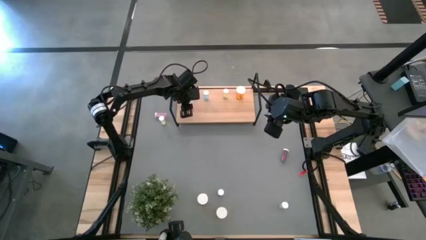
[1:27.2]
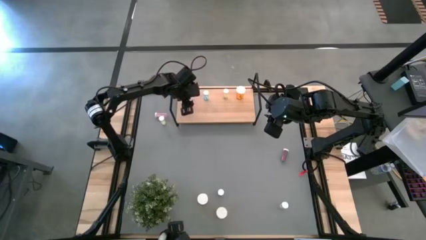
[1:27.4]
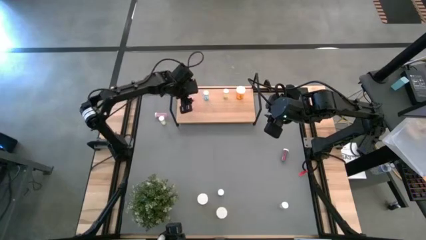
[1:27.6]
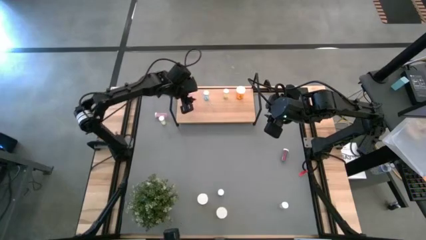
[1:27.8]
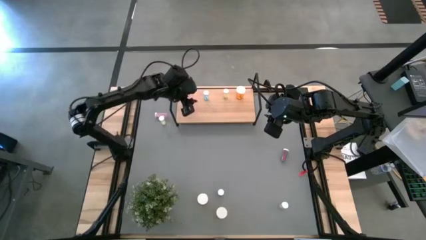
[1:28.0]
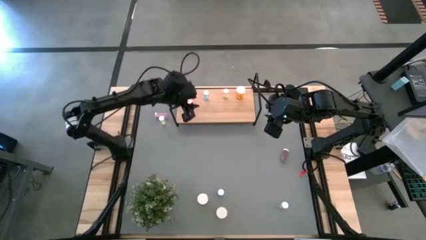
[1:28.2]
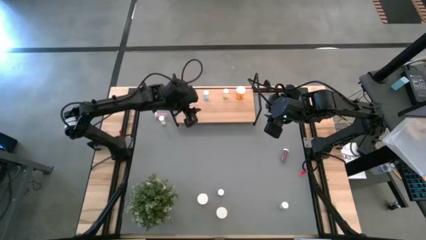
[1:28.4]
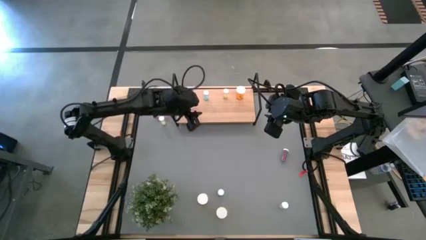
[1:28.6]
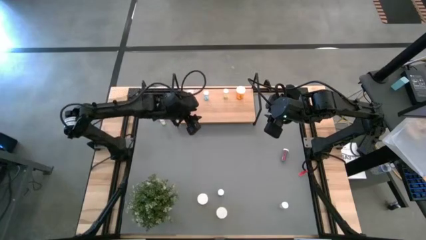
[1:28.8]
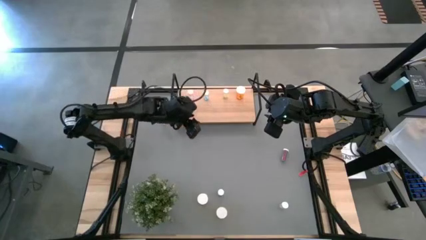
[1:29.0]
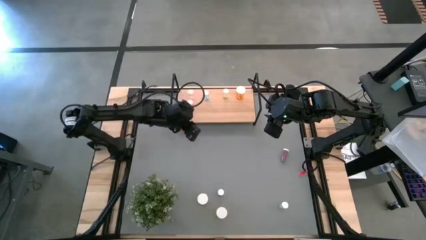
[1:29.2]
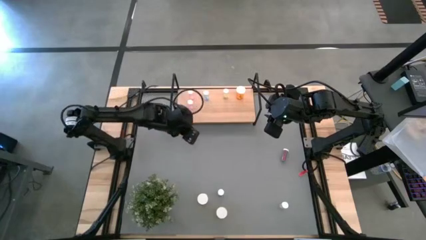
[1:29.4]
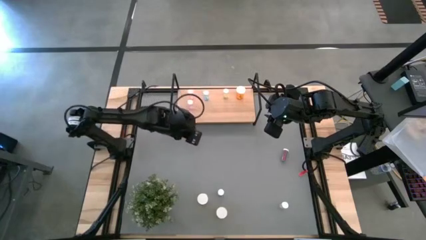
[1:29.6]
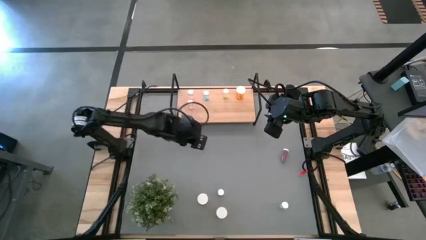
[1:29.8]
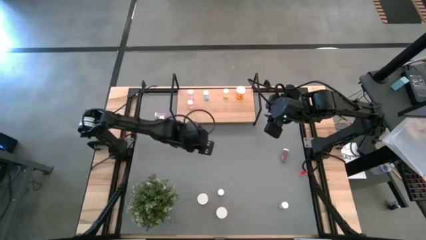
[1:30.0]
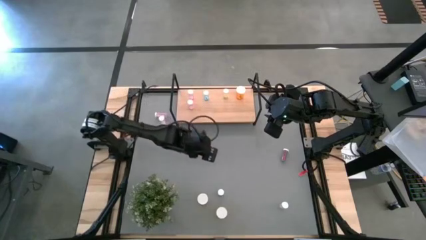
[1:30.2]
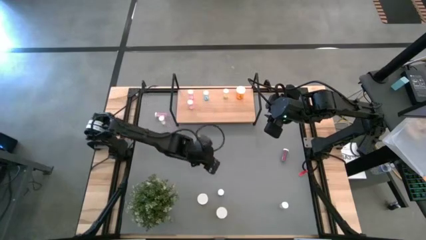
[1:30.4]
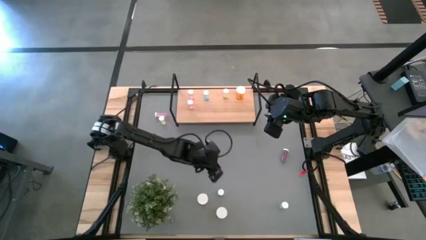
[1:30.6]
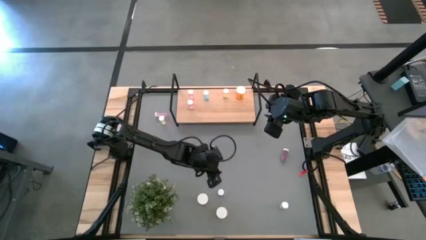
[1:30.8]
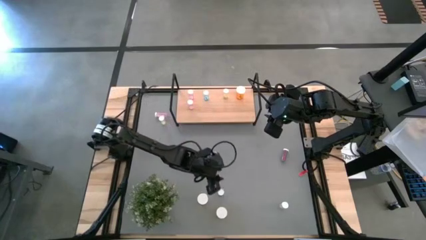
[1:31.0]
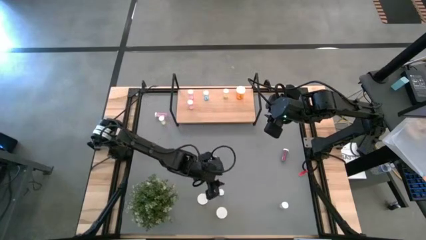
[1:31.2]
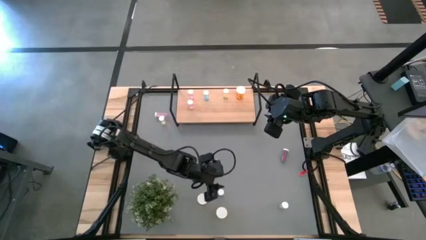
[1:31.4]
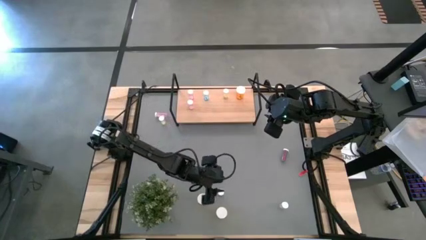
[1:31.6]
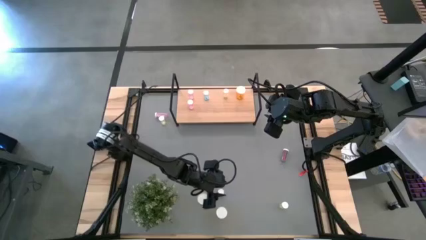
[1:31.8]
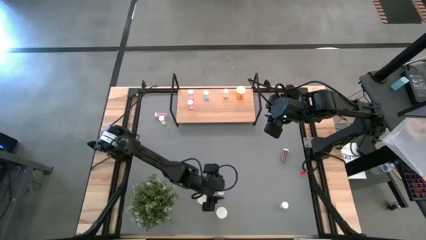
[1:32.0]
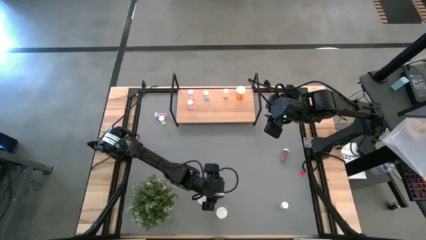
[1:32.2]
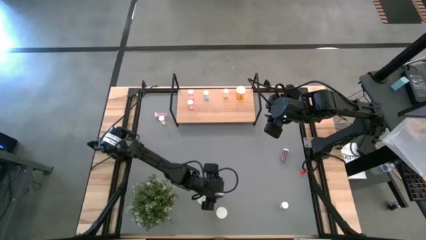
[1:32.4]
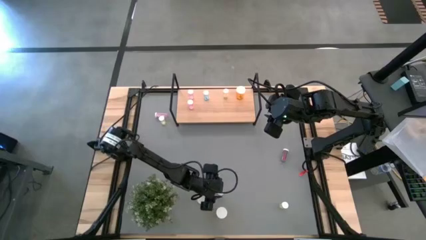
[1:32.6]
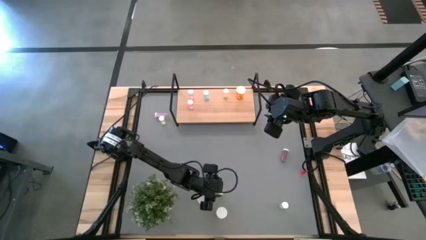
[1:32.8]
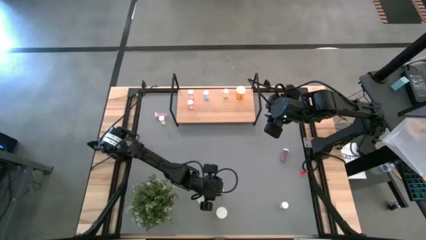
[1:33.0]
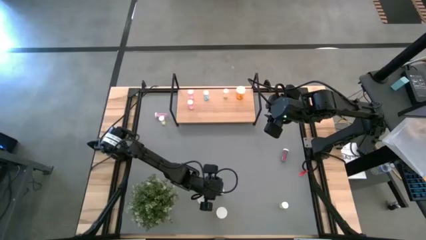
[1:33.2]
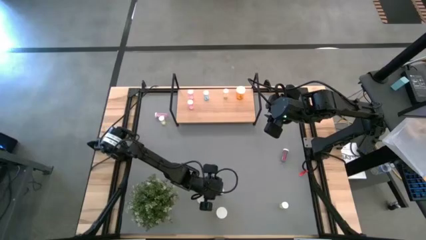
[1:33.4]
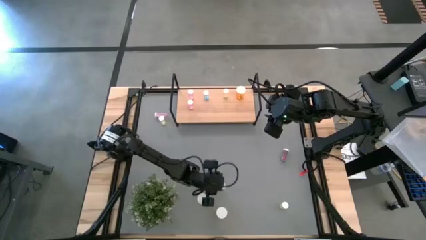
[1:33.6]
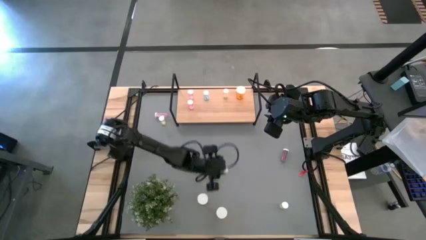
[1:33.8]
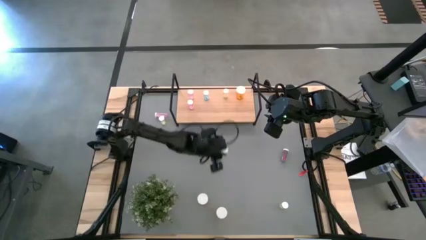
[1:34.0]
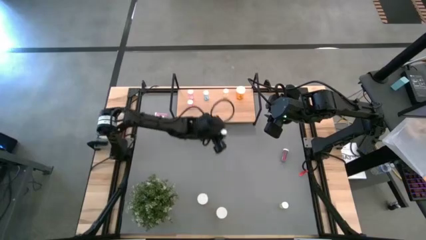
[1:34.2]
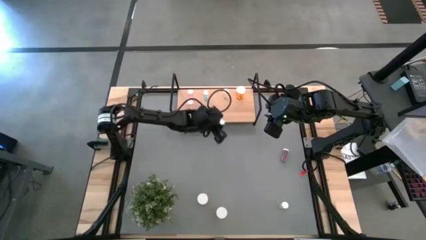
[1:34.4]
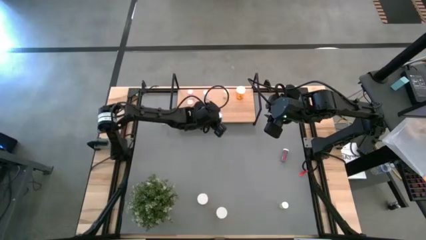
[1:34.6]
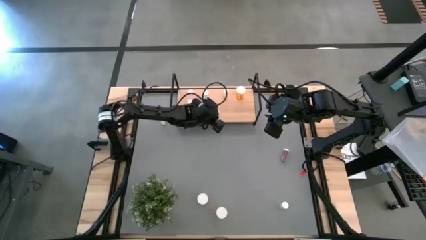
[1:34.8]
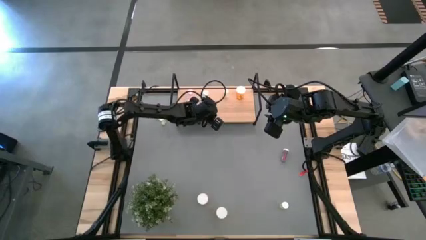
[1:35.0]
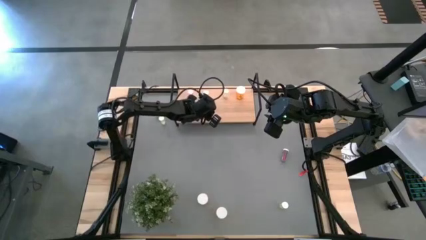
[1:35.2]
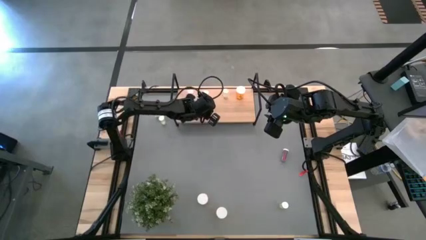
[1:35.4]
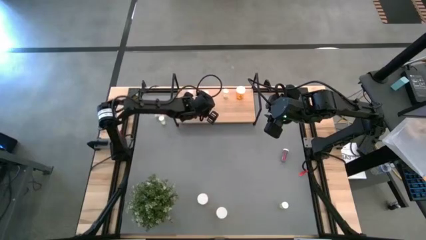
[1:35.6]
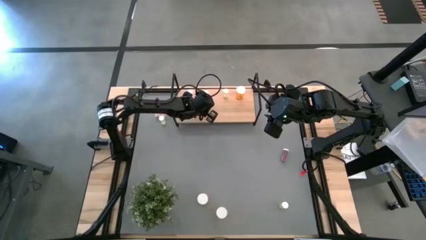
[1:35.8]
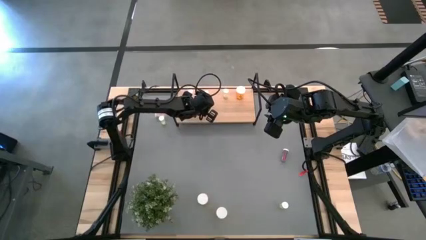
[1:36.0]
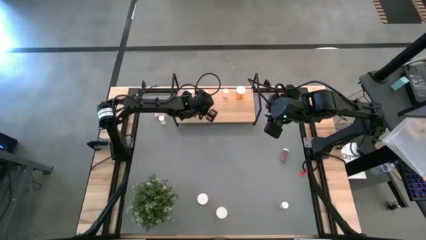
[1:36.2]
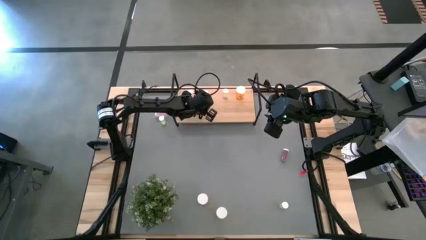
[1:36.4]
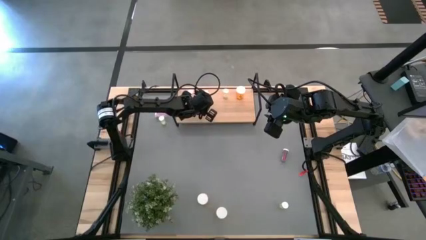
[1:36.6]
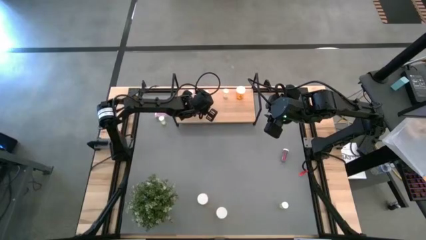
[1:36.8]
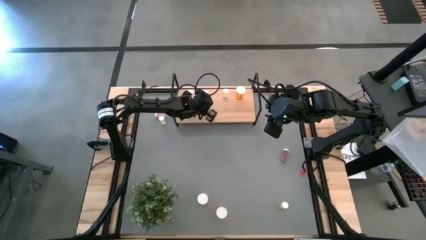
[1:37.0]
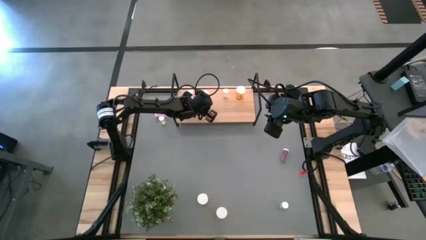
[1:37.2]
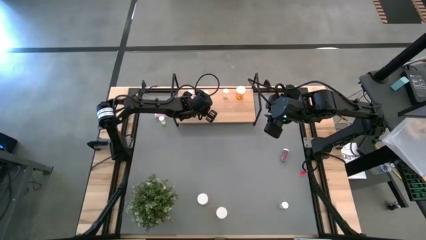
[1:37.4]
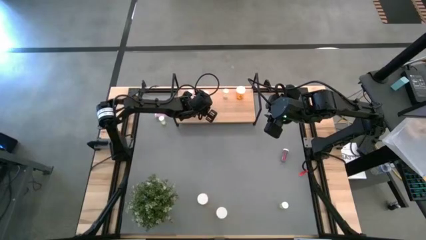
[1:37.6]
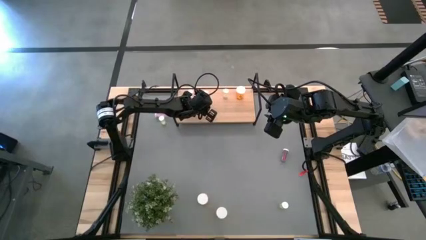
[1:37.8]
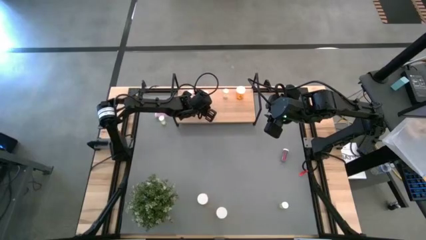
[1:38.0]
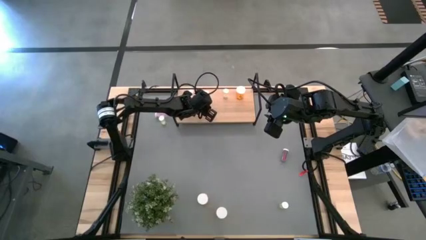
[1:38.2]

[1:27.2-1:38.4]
Task: Pick and place medicine bottles onto shelf by color
Put the left blue pill bottle on the shelf aligned with the other blue pill bottle
